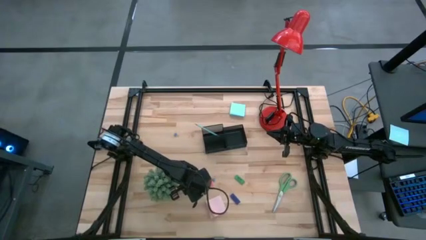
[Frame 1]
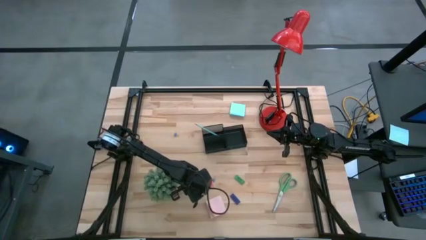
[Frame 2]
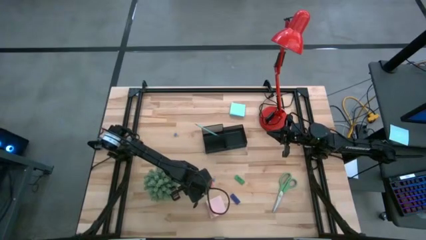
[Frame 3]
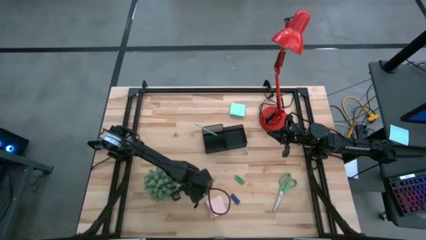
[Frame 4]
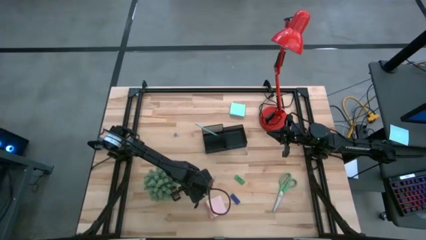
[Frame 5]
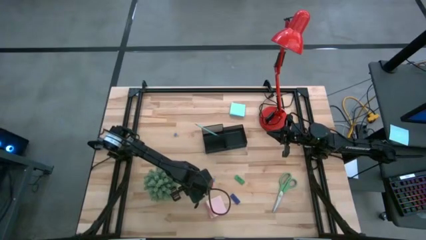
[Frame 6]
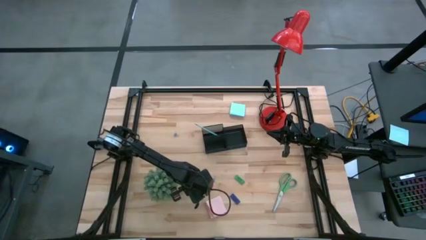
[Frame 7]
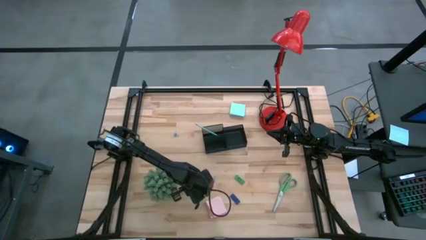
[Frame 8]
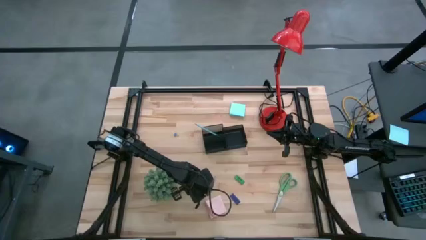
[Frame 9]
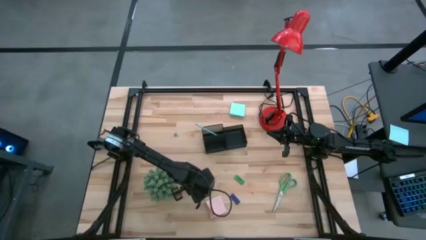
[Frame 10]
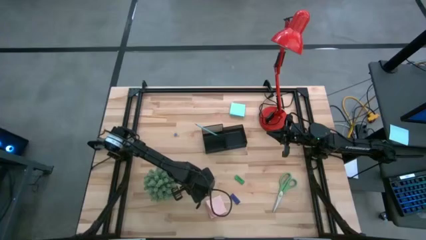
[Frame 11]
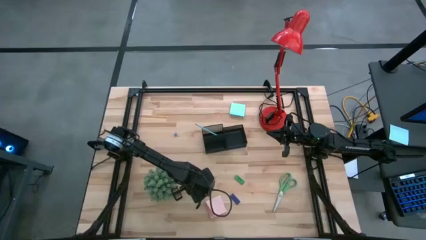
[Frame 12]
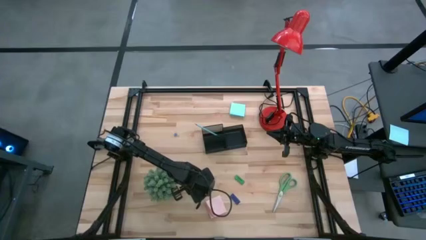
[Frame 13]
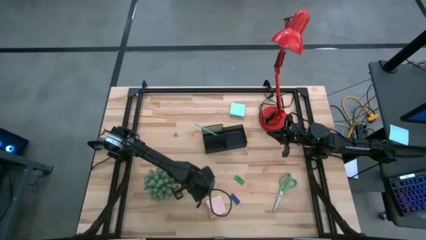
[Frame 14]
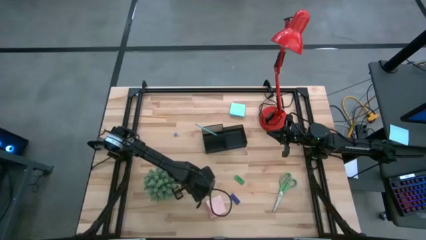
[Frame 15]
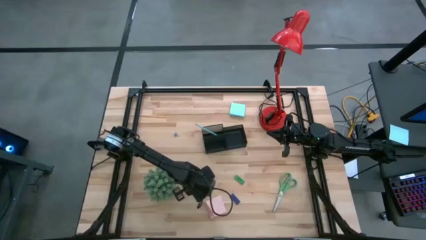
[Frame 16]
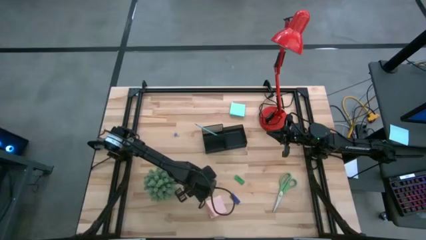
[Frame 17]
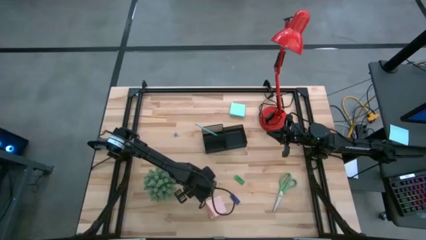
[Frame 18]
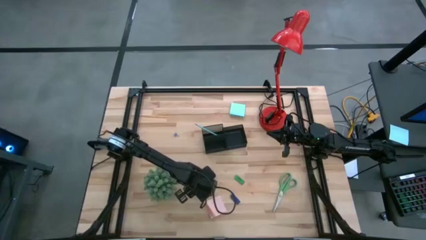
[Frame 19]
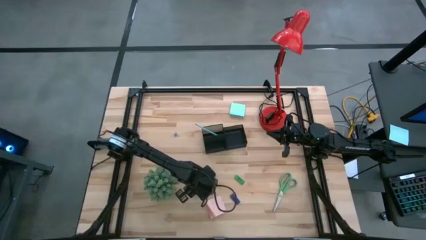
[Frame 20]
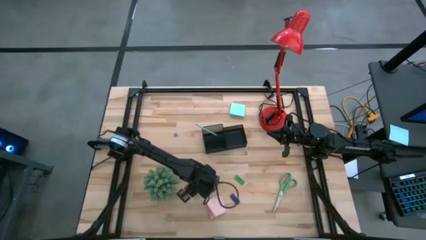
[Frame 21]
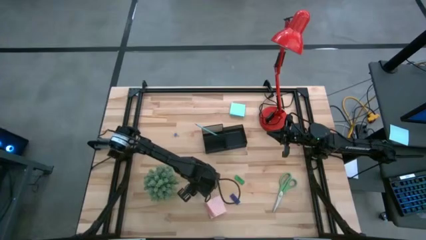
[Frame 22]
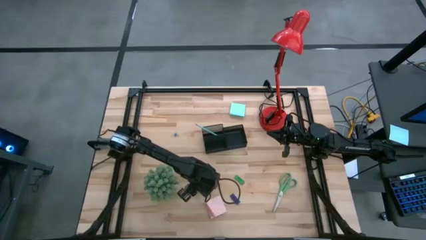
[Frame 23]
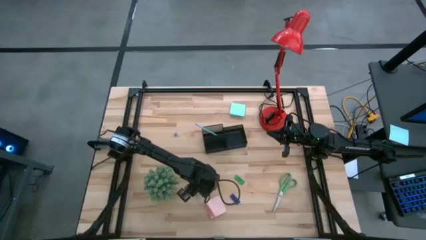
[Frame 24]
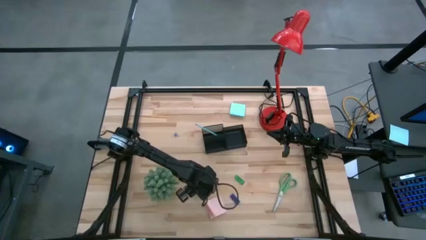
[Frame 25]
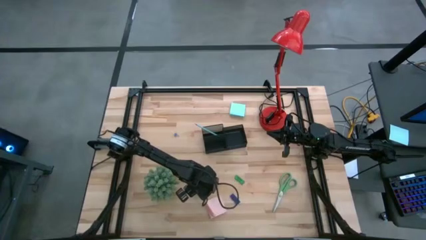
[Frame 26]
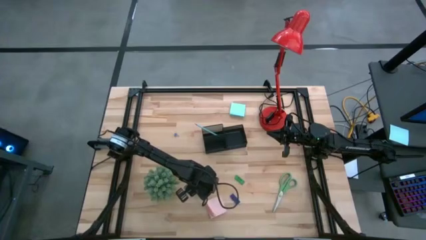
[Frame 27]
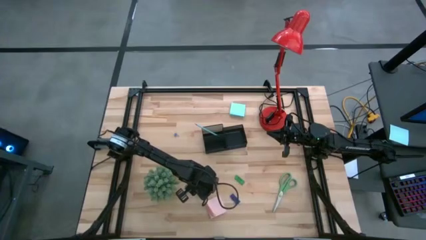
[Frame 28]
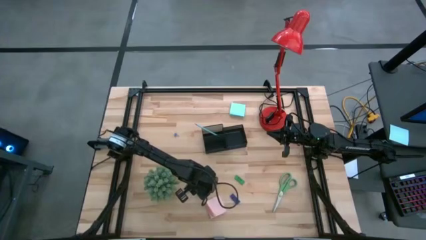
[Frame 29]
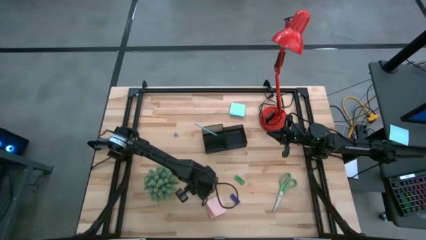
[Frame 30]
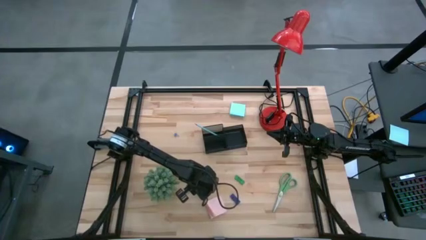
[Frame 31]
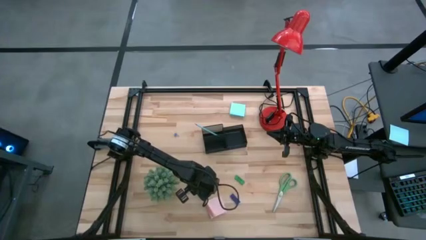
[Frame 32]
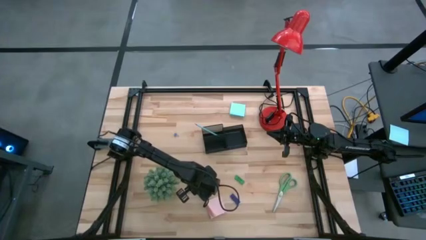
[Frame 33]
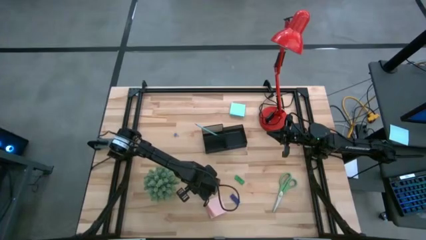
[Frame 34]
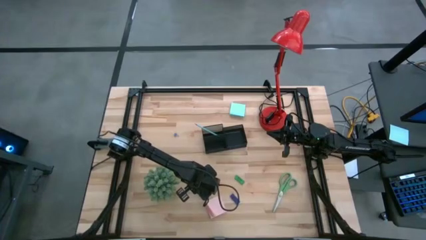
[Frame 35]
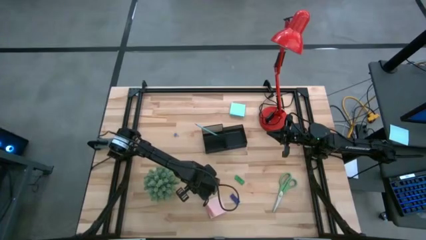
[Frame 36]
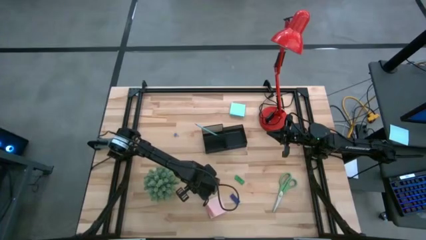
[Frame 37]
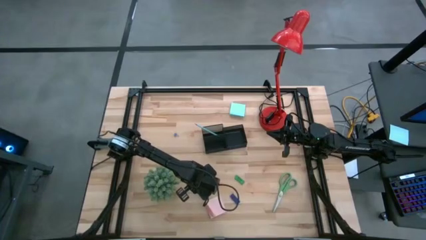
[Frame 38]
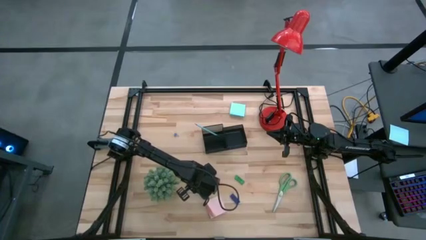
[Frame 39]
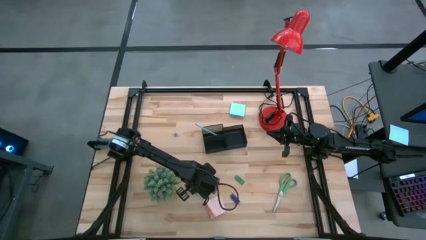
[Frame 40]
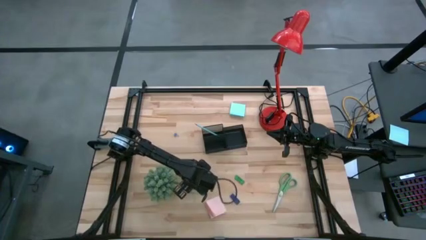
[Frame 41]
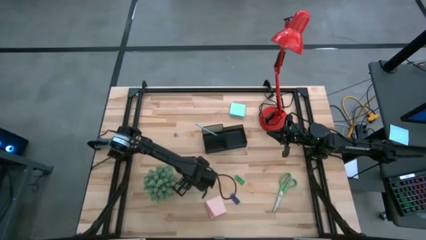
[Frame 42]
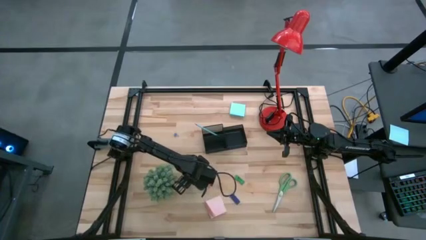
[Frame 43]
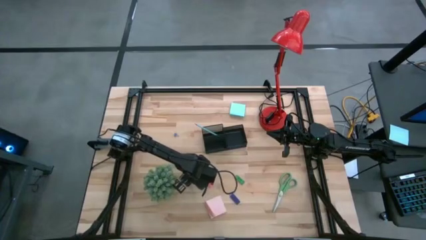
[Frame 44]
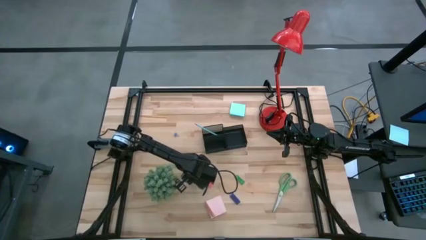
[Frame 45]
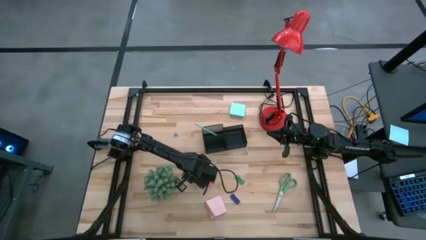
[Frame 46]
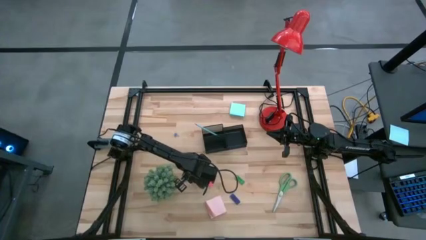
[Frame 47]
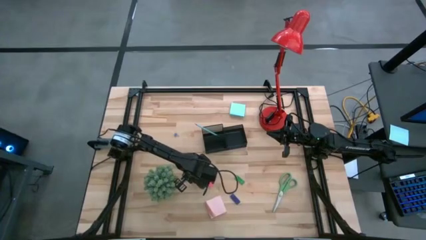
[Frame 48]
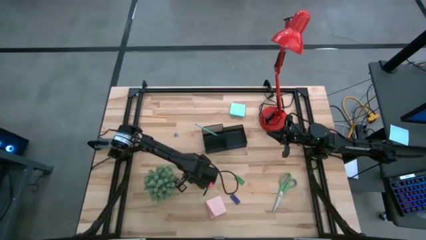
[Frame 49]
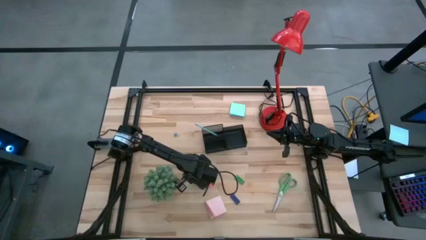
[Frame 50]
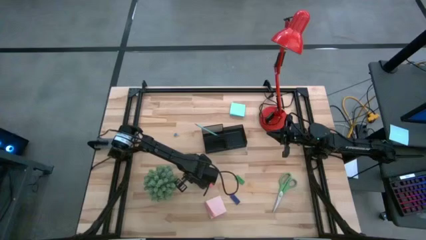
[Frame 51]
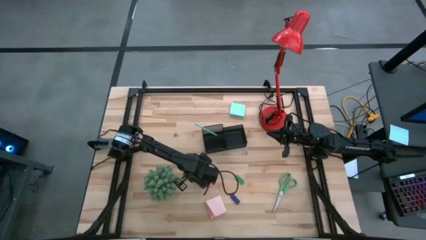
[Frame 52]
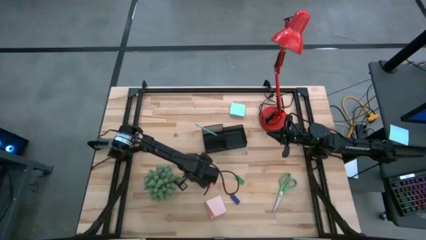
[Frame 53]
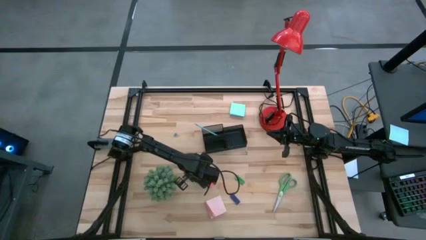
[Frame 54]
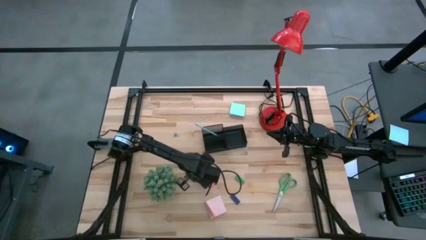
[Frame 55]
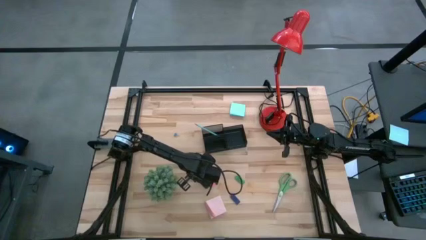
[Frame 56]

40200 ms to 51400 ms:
Task: Pick and place office supplies into organizer
Put the yellow pencil into the black desk organizer
